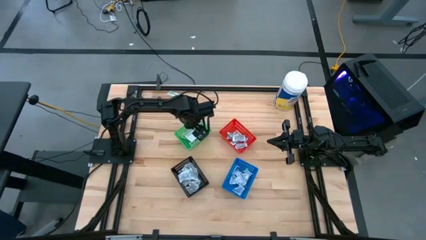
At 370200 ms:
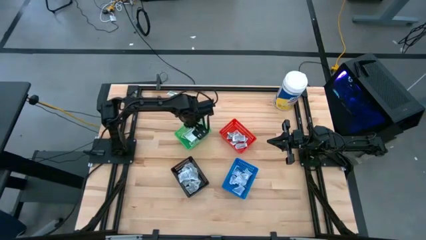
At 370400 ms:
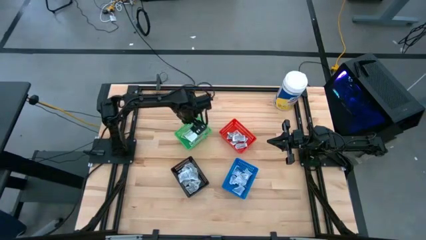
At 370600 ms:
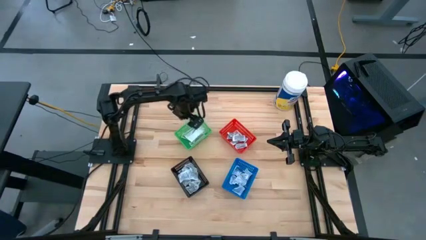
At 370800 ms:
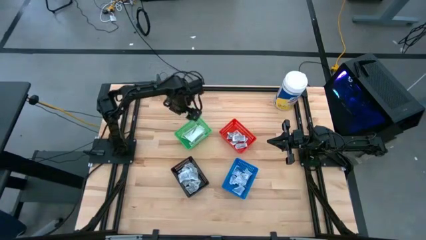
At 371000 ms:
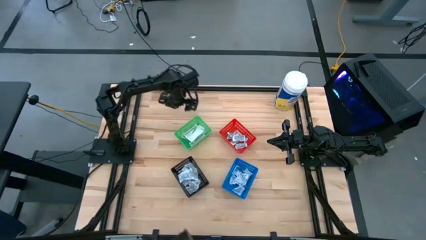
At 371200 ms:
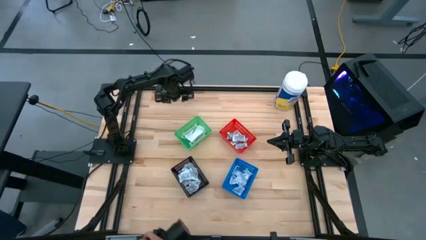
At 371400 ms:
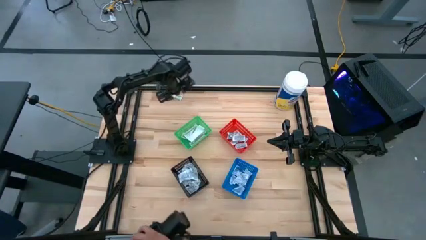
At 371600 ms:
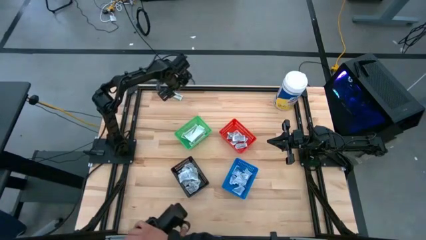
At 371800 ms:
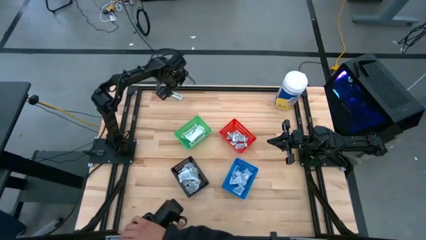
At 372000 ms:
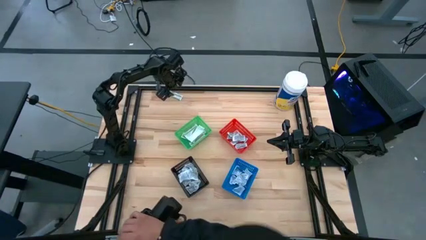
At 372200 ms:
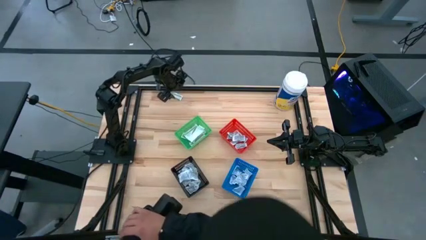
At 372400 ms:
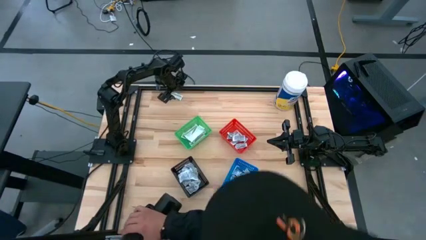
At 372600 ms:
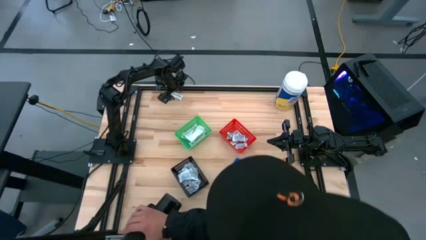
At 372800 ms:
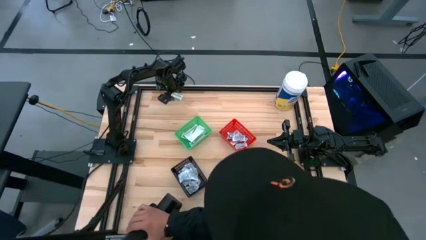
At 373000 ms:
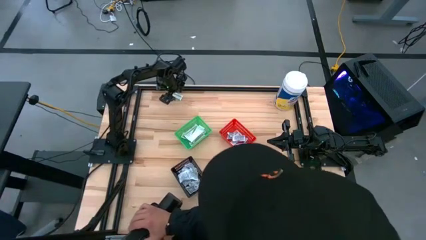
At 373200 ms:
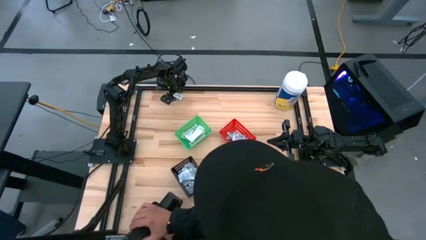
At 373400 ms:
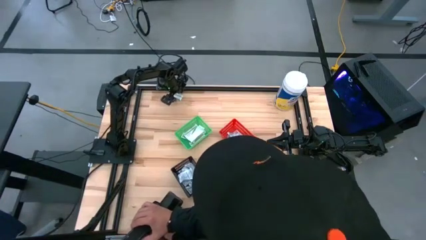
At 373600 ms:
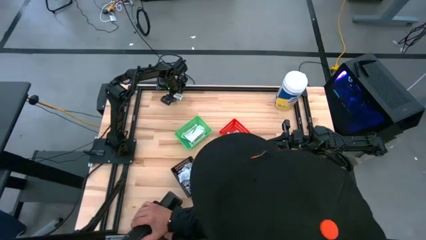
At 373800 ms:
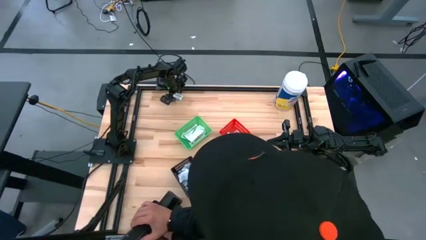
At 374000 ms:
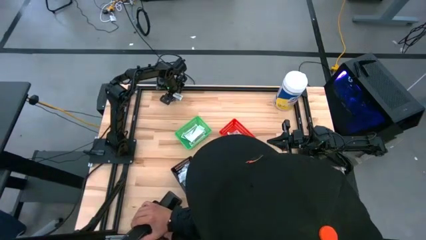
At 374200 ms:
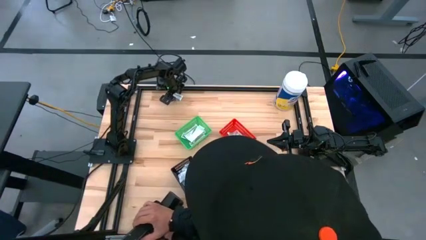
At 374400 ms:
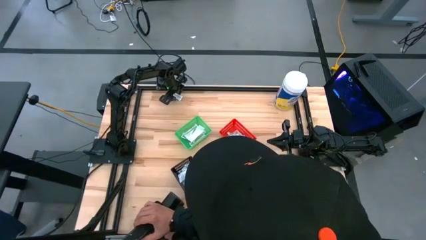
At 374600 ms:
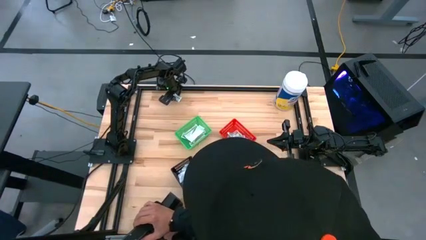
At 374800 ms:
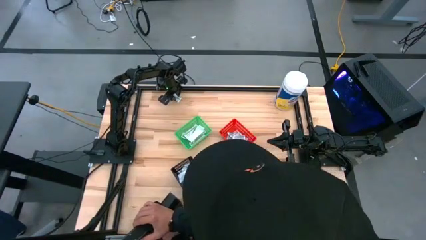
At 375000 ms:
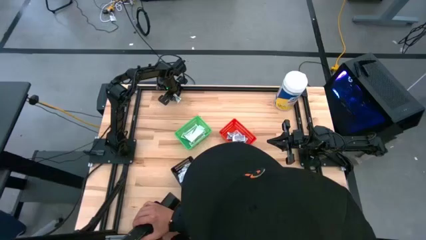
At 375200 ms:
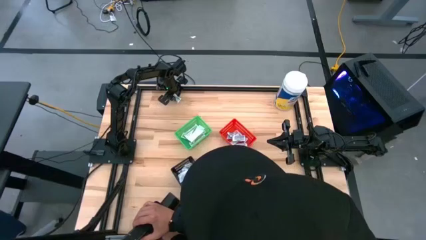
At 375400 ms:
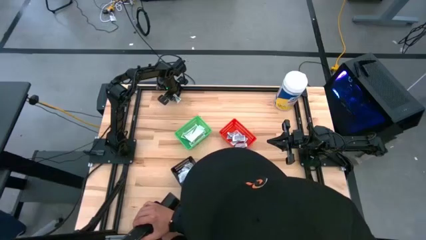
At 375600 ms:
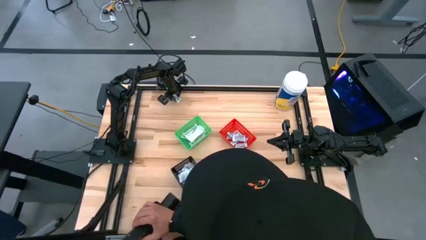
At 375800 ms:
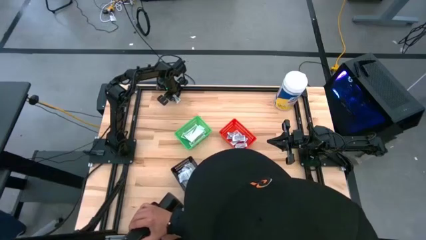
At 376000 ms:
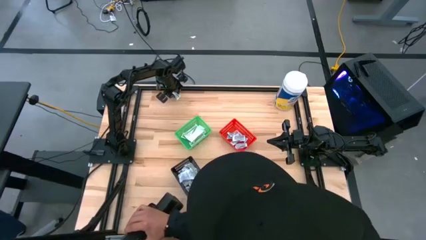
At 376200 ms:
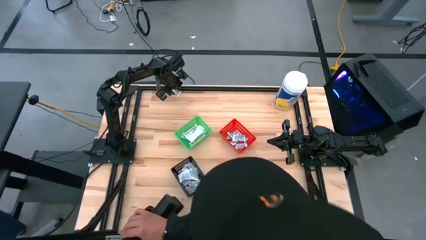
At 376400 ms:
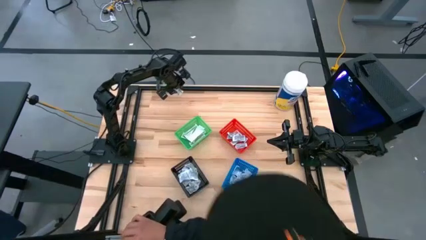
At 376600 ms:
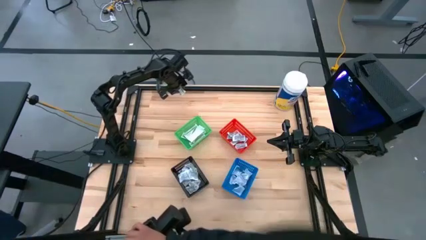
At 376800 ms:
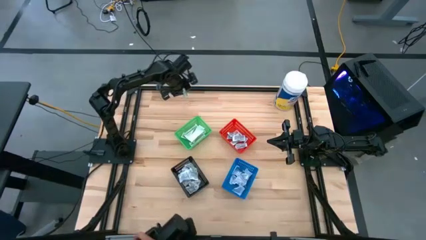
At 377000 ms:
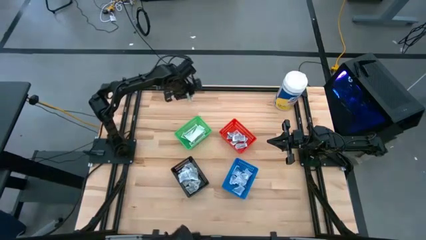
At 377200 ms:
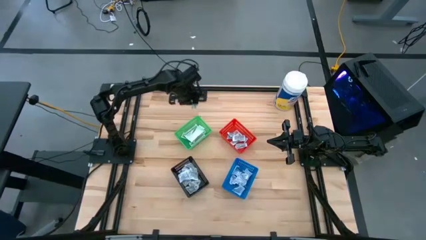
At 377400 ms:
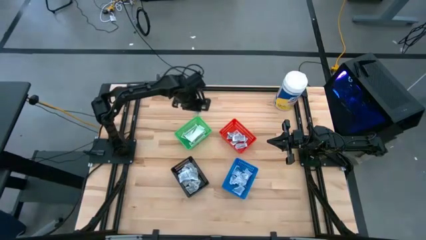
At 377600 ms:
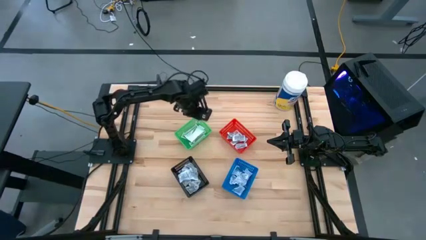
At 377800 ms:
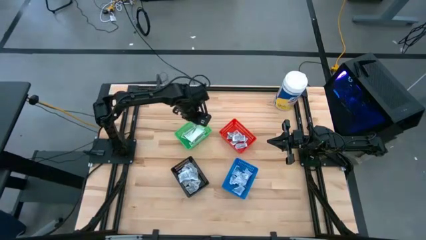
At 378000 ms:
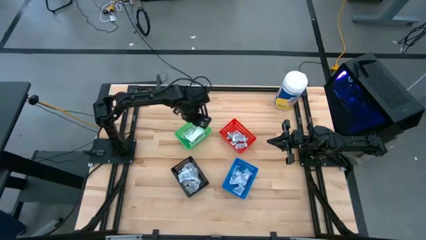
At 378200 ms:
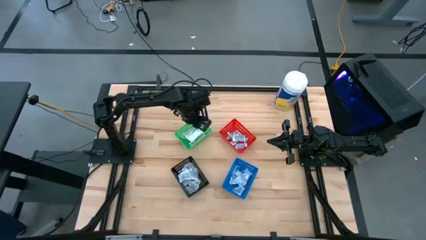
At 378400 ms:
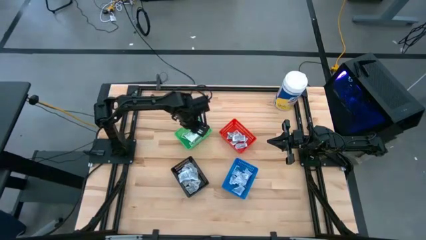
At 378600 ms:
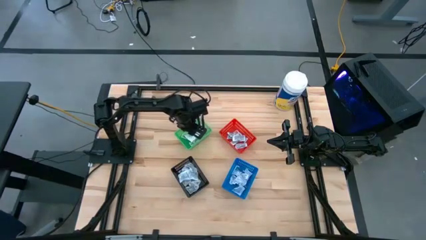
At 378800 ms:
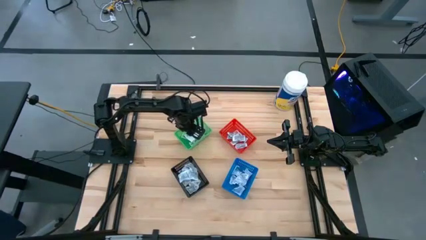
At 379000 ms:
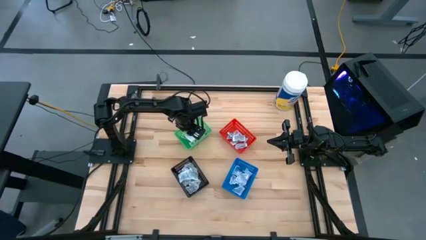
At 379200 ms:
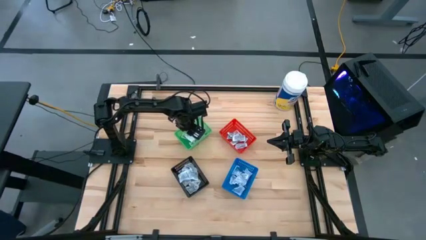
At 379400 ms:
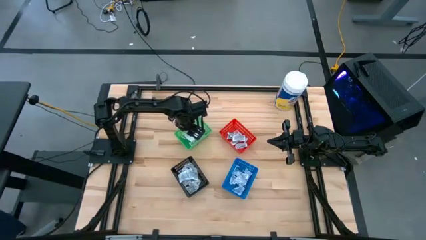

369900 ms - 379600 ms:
Task: Pick & Place First Aid Supplies
Put the green bandage pack into the green bin

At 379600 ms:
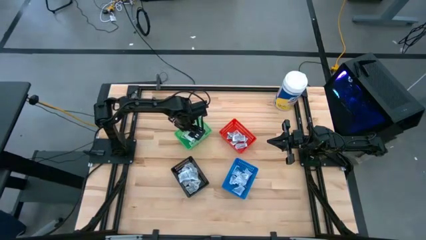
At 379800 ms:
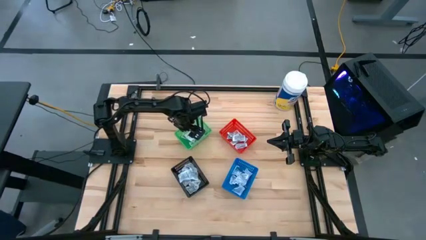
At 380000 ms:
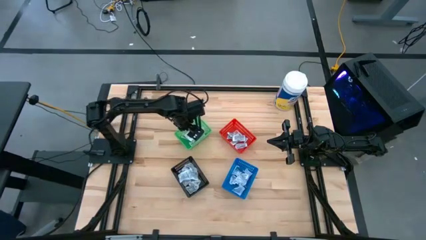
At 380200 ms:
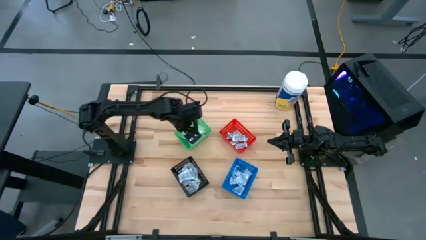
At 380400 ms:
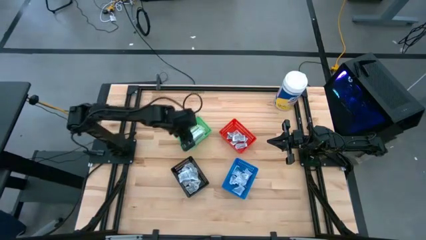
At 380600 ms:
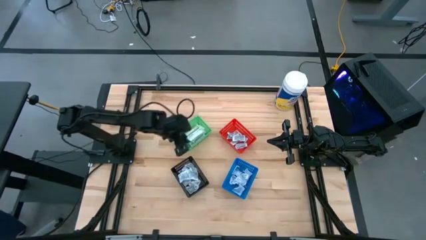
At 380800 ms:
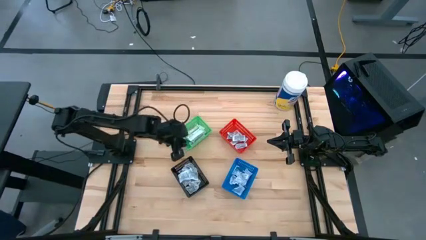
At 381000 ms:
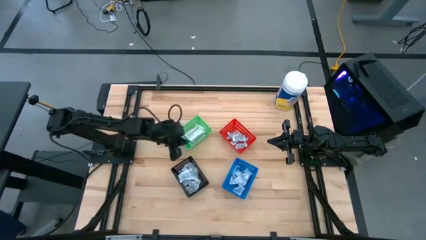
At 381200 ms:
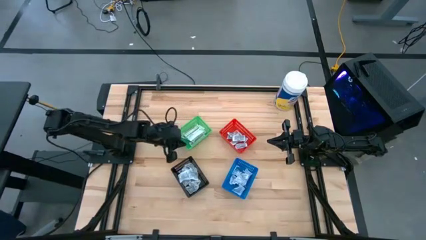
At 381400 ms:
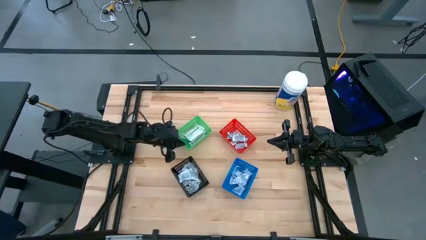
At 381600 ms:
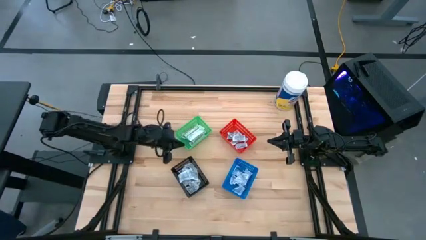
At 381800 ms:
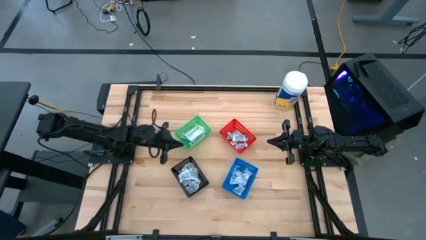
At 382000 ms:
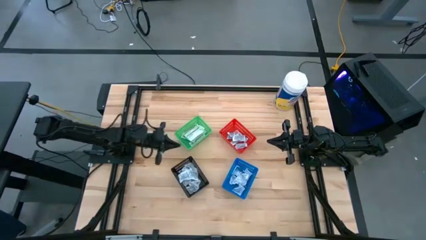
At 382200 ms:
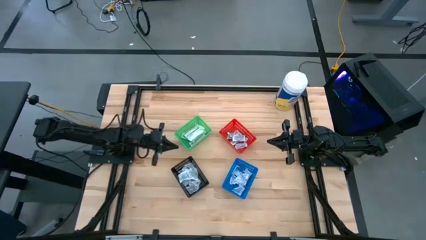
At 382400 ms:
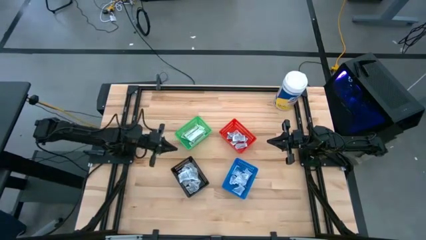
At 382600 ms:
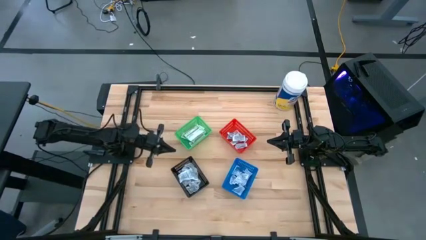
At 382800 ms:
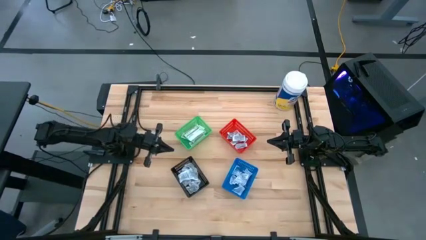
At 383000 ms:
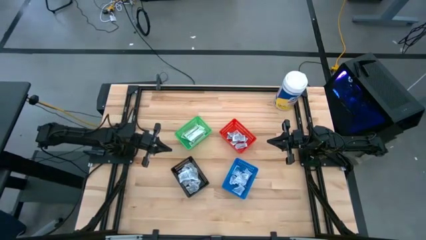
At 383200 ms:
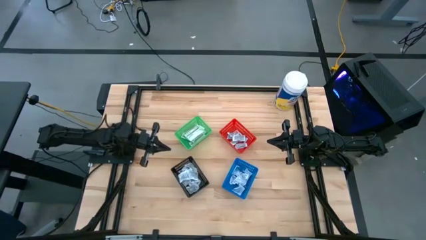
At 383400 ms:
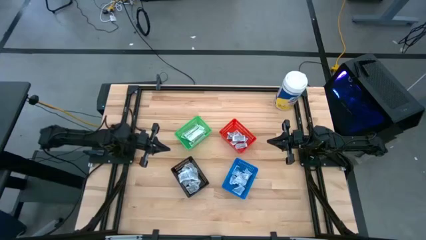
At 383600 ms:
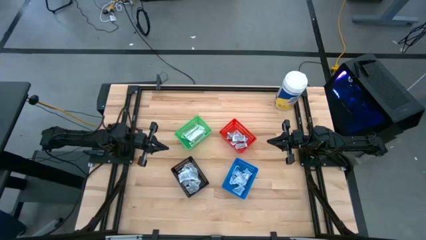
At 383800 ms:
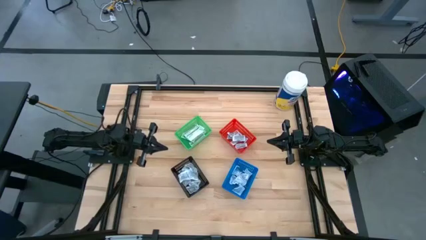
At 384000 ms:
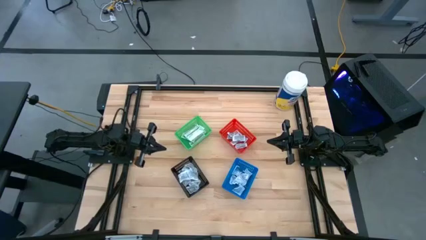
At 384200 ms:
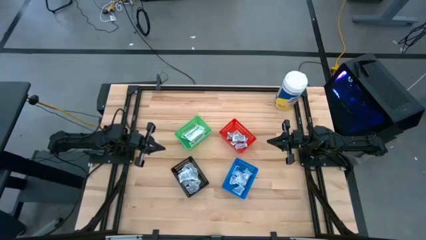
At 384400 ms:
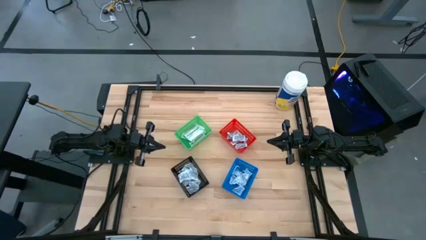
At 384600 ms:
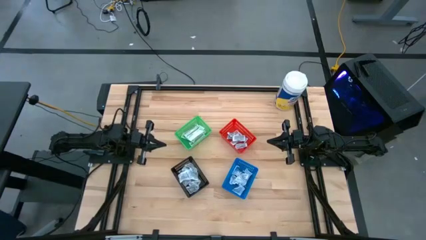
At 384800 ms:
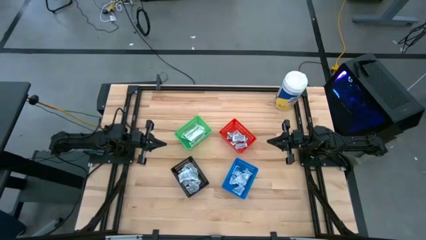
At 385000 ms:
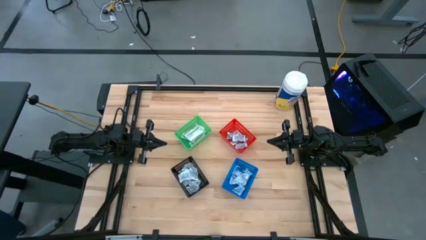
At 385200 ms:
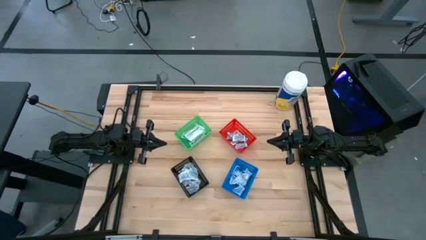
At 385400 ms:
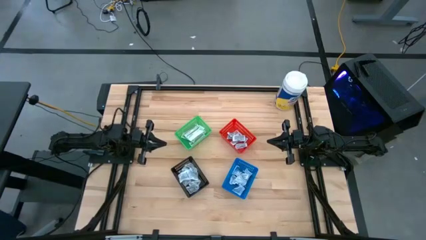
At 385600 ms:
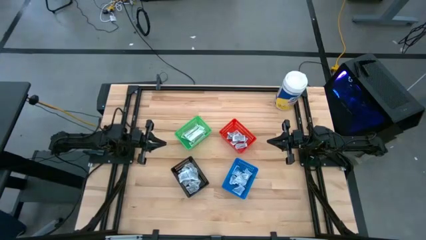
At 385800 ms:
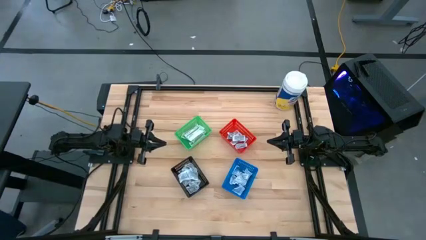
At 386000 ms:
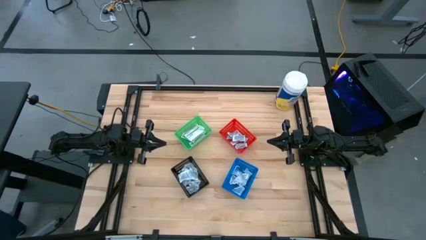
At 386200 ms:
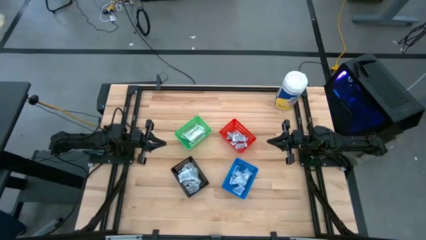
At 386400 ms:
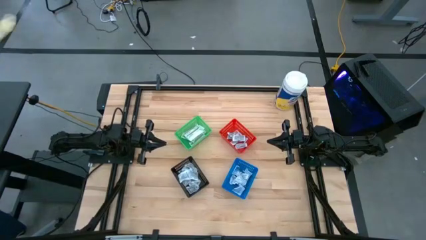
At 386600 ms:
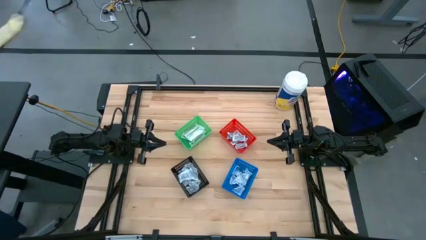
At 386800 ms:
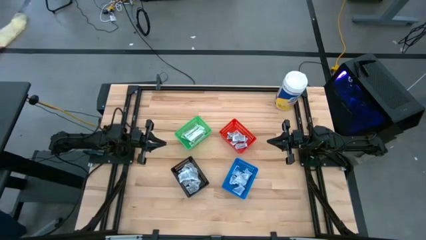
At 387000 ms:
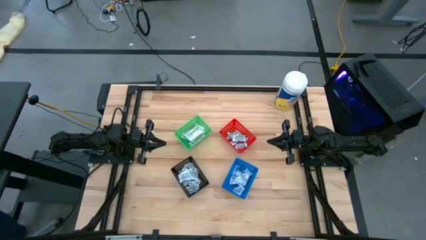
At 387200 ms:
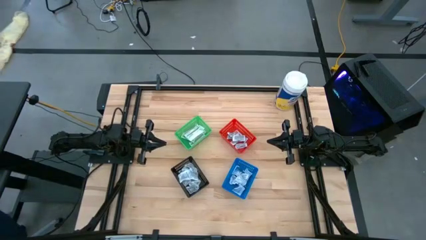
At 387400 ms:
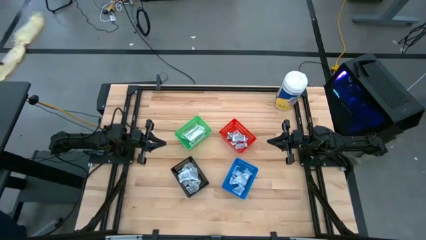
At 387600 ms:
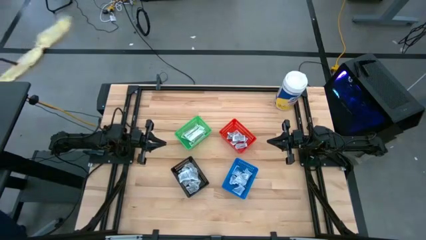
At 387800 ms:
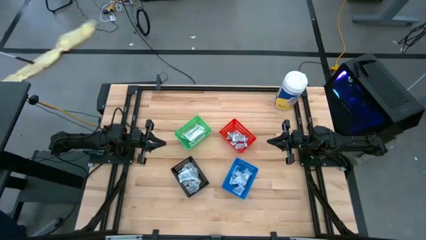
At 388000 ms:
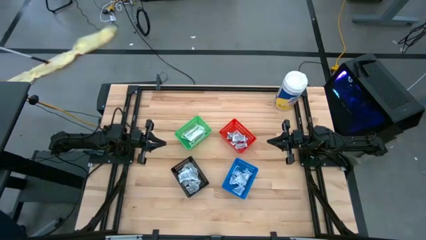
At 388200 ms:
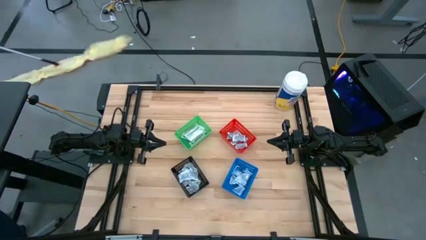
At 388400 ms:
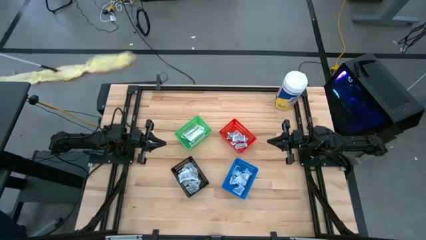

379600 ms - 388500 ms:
Return to Home Position
